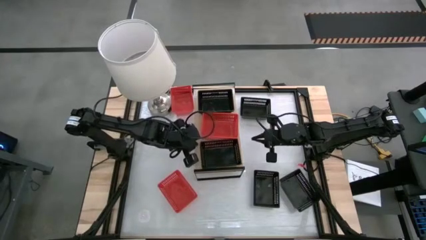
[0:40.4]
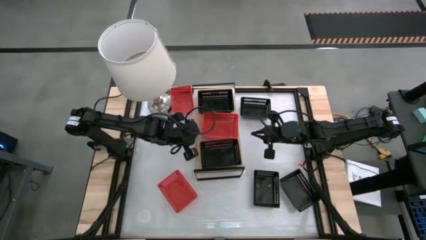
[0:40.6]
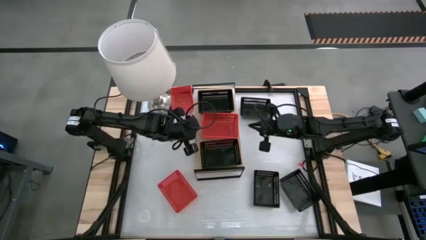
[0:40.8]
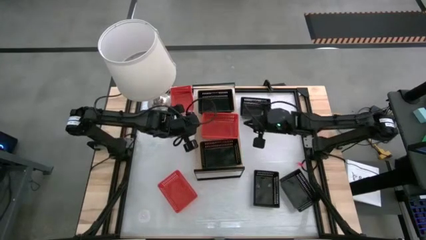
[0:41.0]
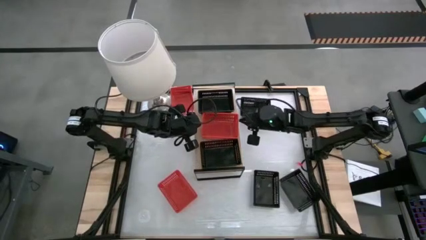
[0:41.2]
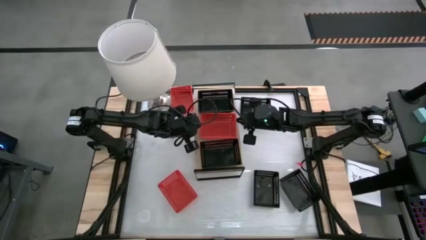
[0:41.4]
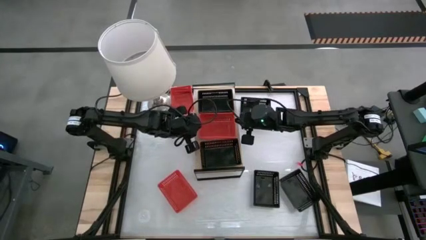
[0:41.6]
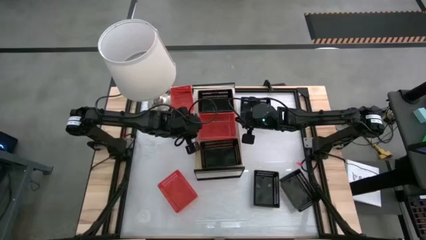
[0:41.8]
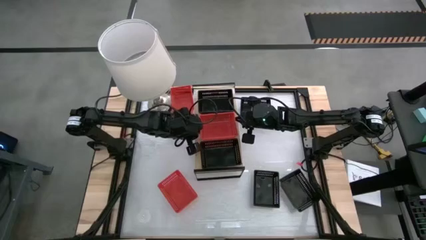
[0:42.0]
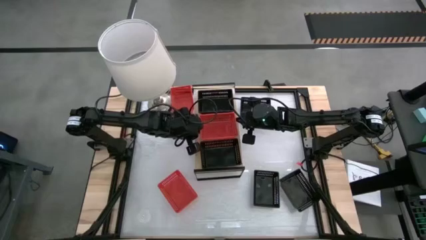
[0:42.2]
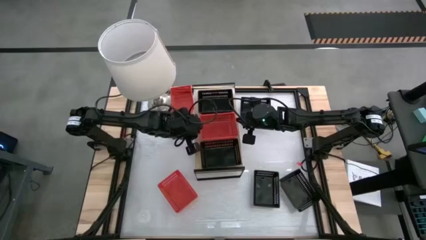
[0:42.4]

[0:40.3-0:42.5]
Task: Stack baskets on shelf by color
Adjust the red bin on the shelf

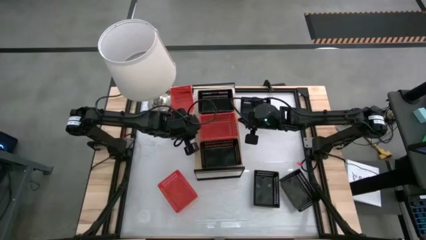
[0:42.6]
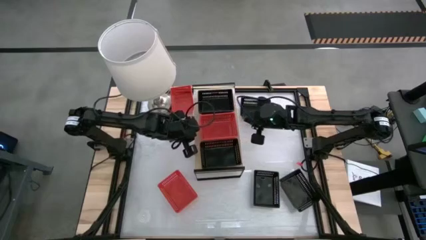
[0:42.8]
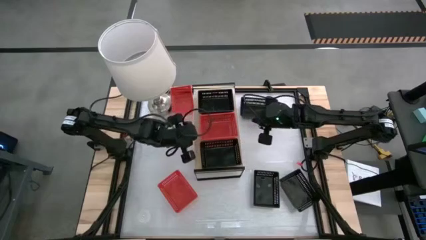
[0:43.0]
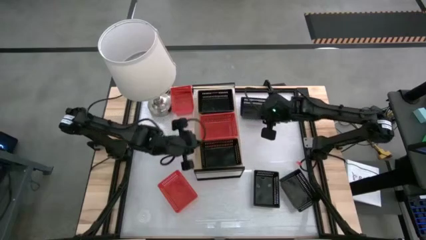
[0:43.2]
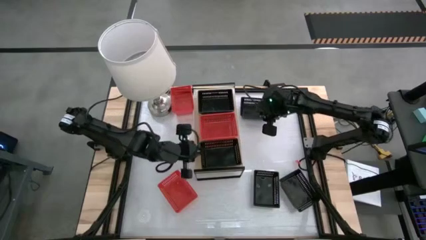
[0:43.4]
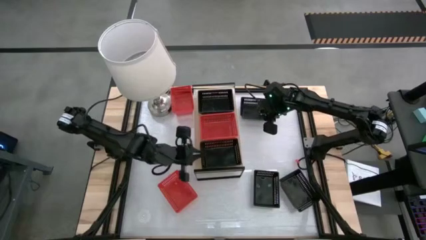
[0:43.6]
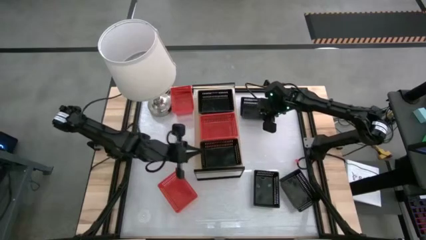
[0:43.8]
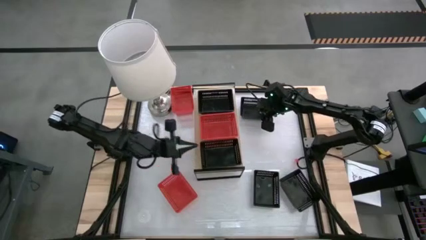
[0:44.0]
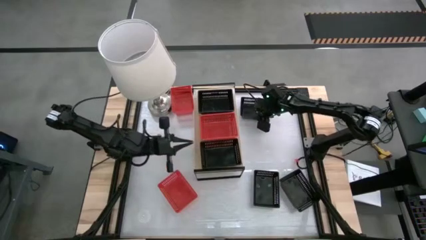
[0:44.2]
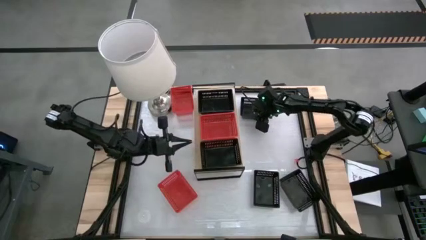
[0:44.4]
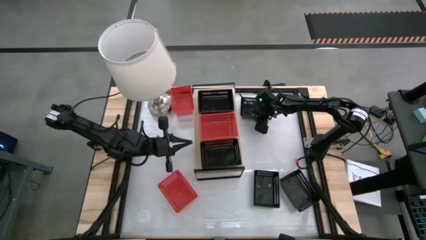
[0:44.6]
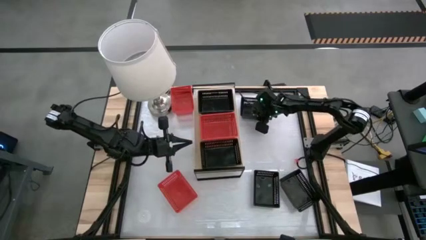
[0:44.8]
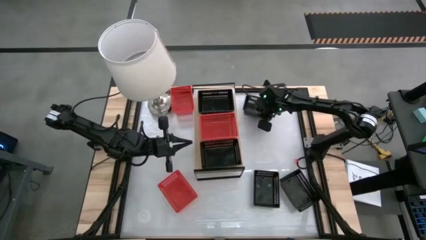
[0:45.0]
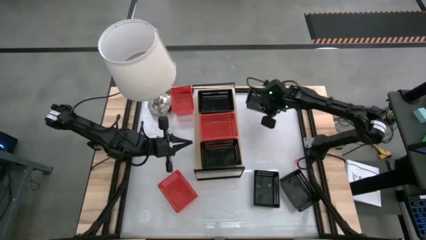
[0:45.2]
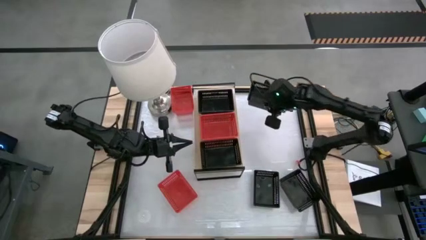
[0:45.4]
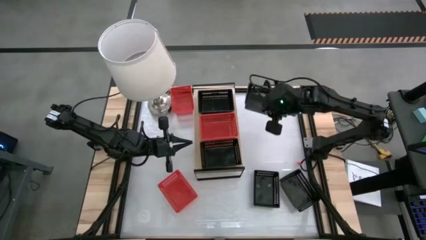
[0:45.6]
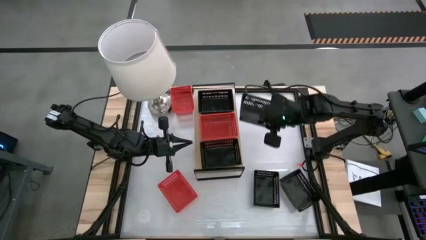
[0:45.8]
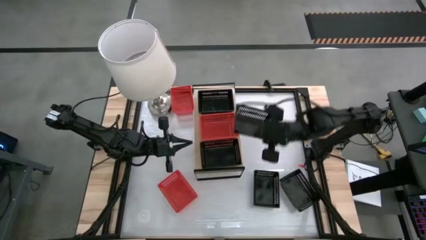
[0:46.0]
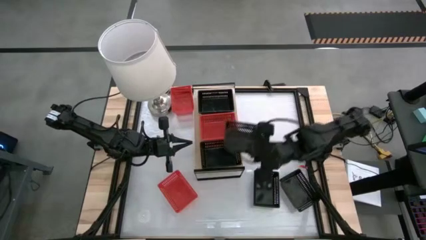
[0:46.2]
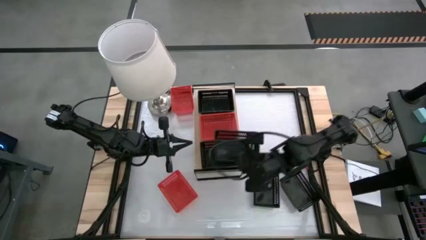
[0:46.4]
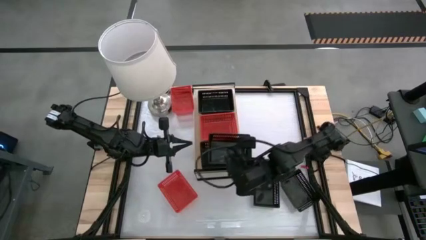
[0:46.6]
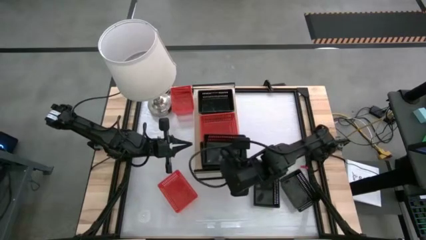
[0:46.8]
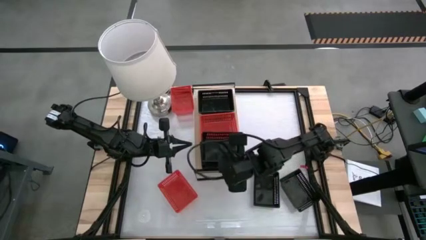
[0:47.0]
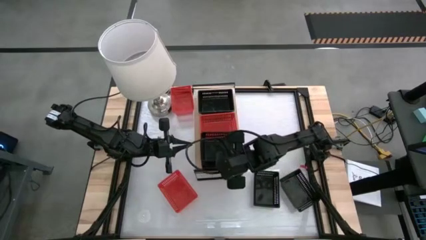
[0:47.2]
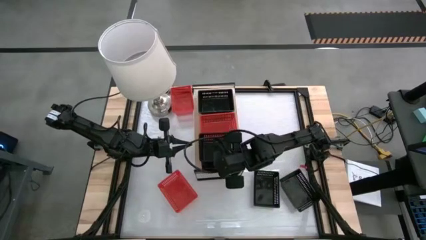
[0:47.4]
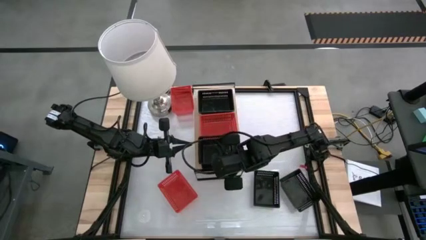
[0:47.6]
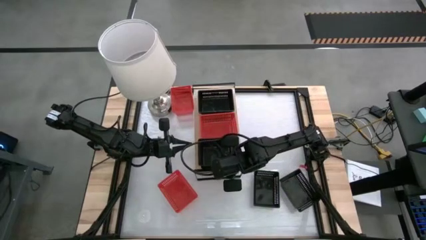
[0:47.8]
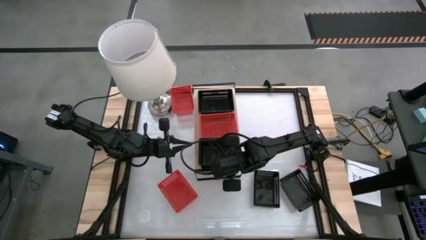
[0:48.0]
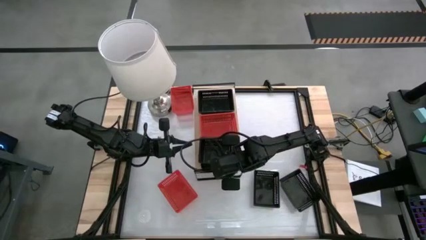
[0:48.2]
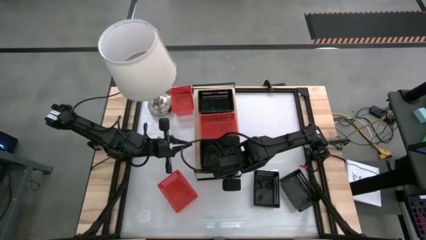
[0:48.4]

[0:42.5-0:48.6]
Stack the black bin on the bottom black bin on the shelf

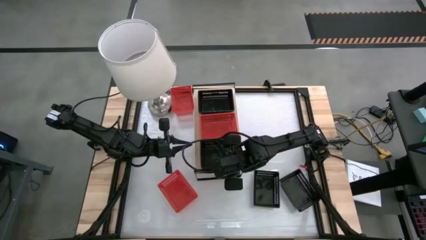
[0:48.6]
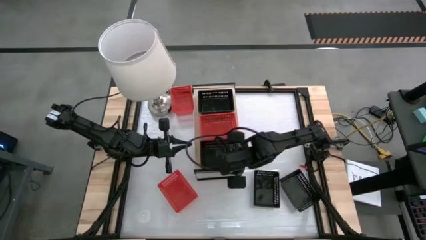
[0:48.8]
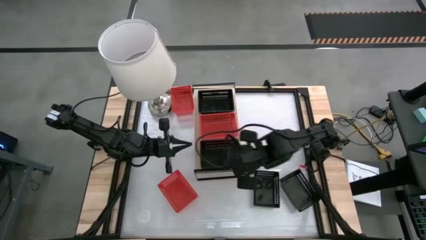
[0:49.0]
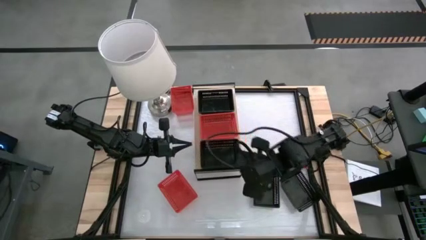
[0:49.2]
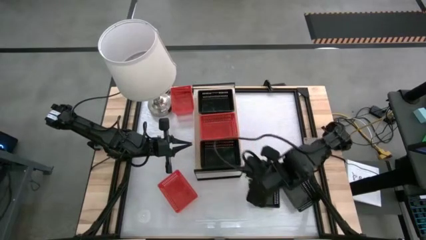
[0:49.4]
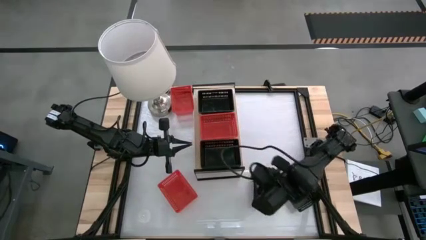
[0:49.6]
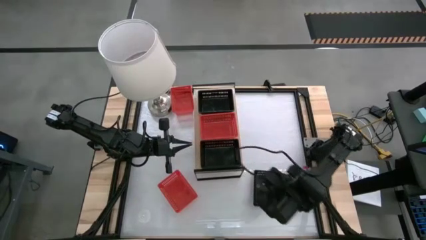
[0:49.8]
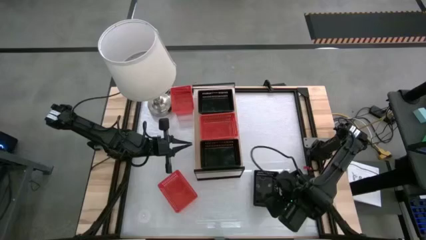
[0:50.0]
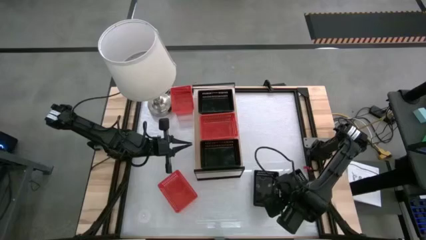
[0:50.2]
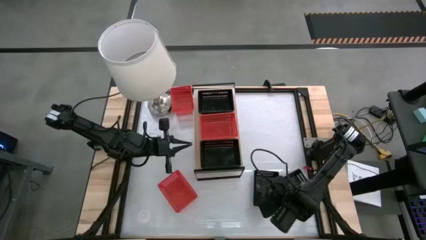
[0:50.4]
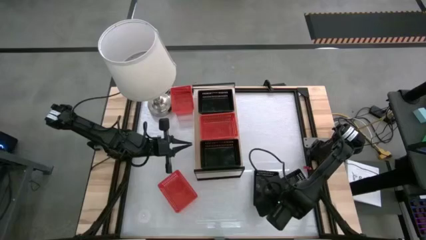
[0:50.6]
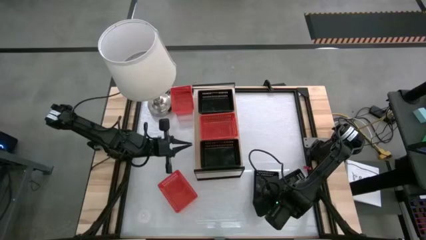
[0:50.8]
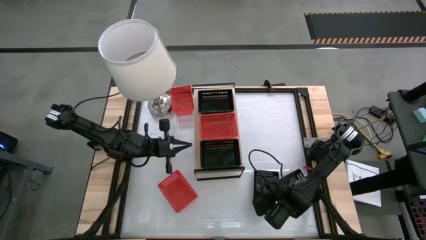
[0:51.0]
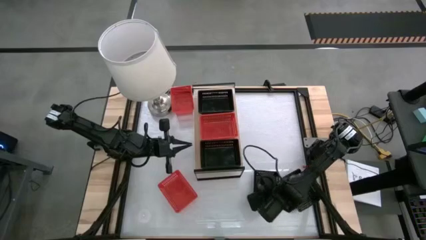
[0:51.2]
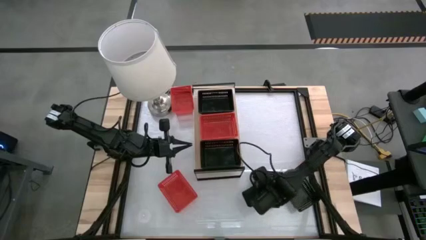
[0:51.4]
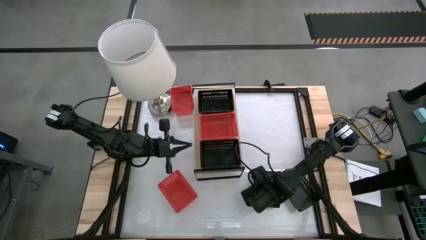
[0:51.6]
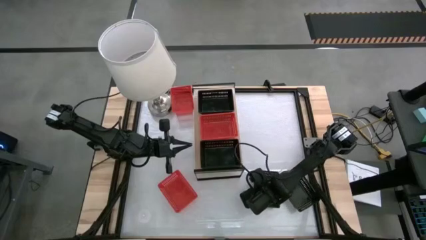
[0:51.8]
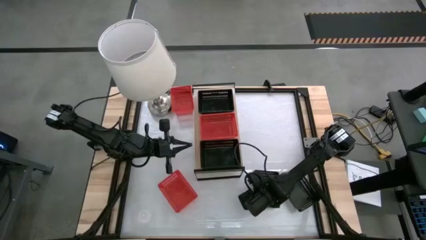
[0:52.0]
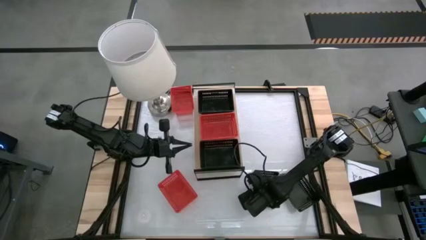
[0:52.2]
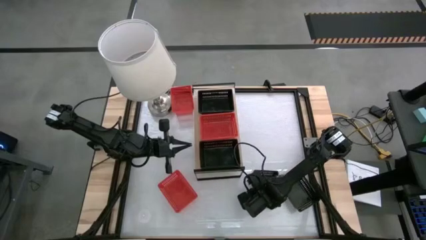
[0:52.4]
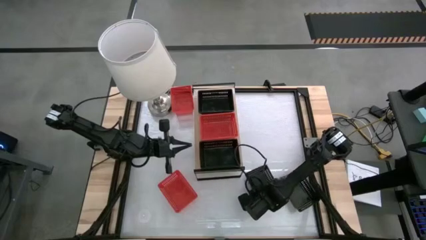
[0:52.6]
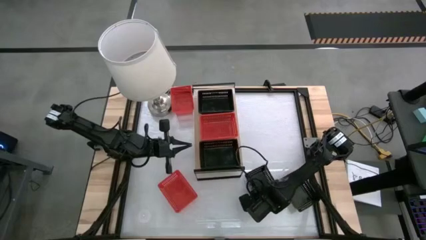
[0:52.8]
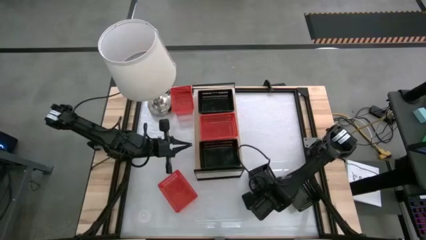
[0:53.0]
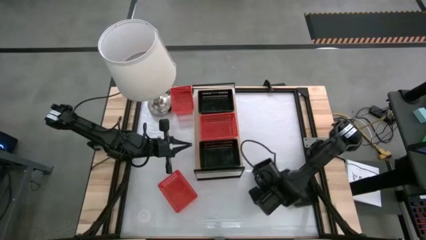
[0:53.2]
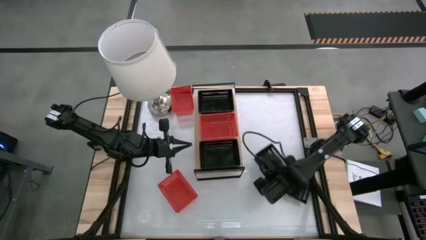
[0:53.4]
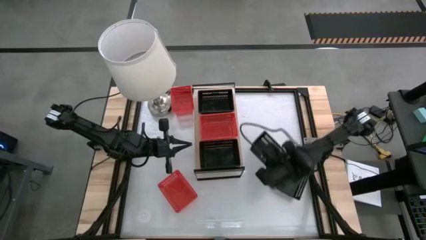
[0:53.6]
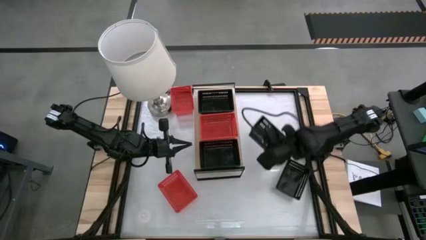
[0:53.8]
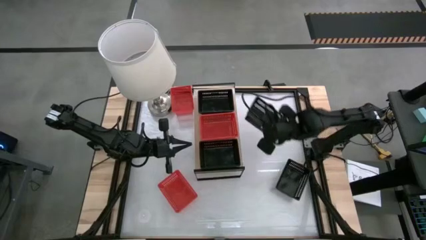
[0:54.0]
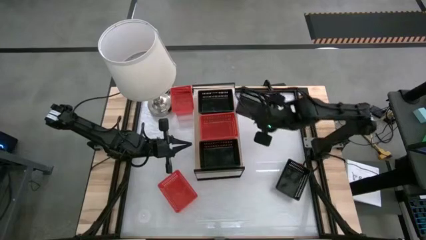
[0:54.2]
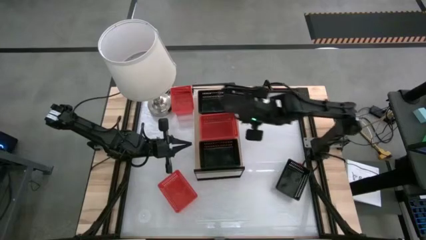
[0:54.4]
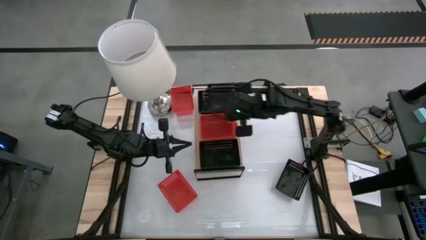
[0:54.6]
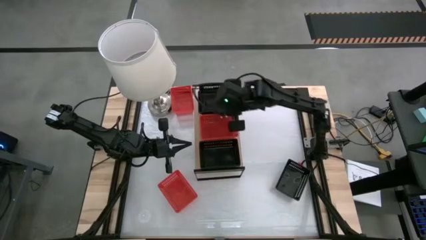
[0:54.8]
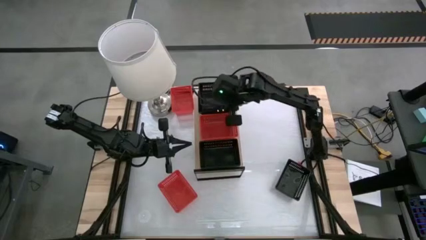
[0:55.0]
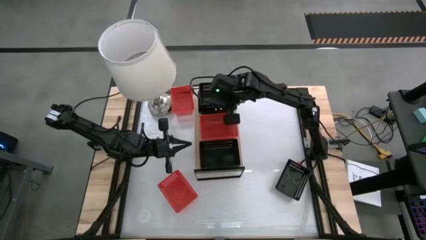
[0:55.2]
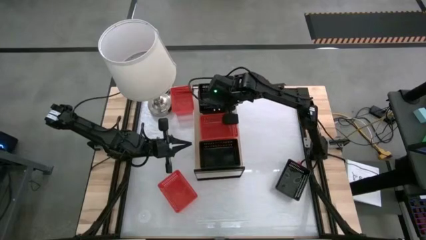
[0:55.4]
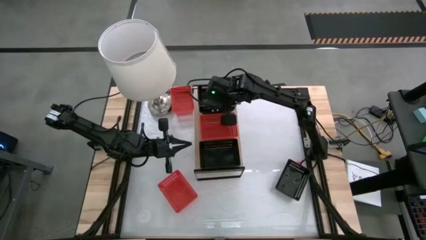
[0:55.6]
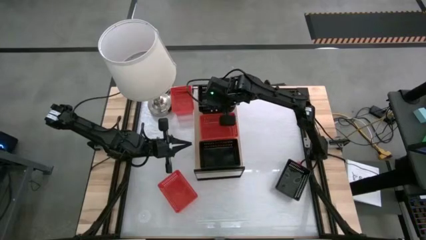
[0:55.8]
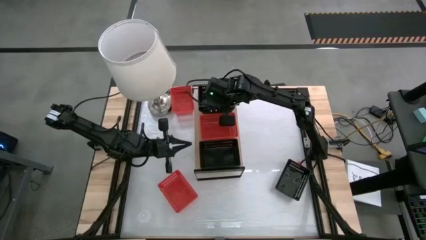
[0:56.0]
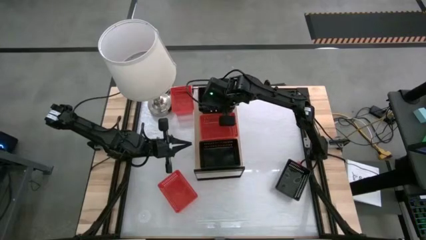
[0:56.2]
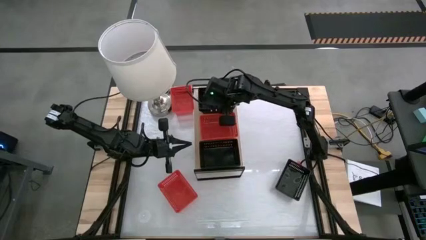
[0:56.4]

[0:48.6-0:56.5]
Stack the black bin on the top black bin on the shelf
